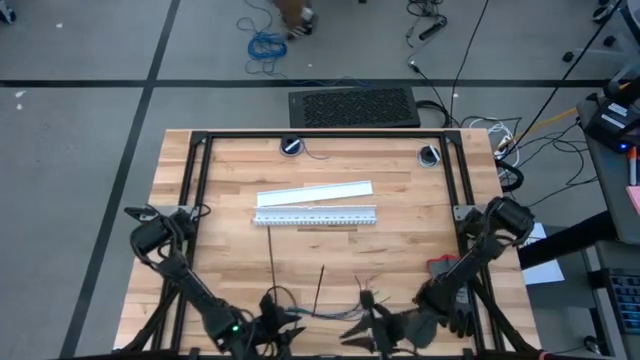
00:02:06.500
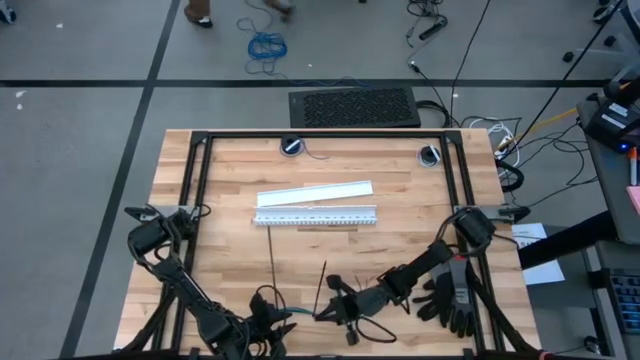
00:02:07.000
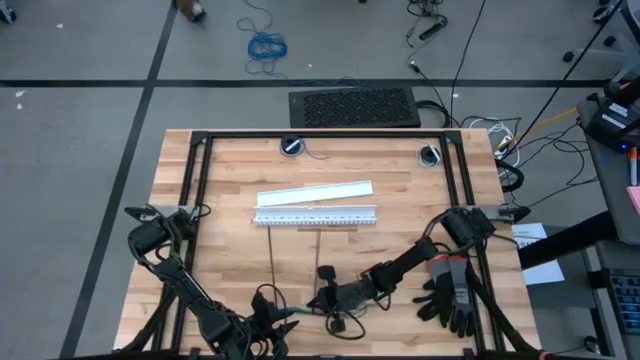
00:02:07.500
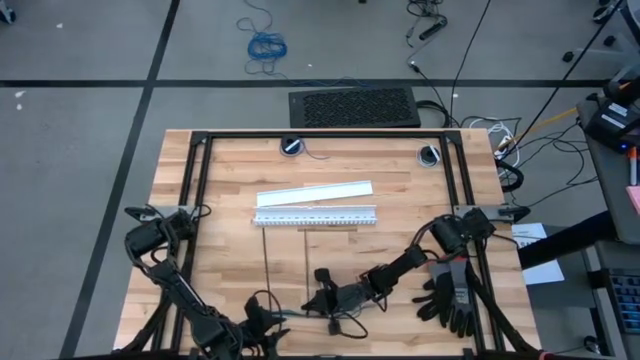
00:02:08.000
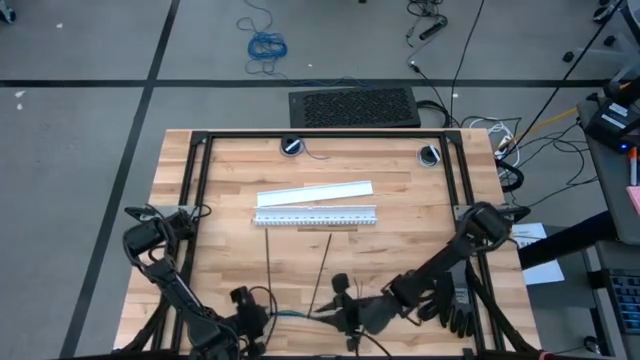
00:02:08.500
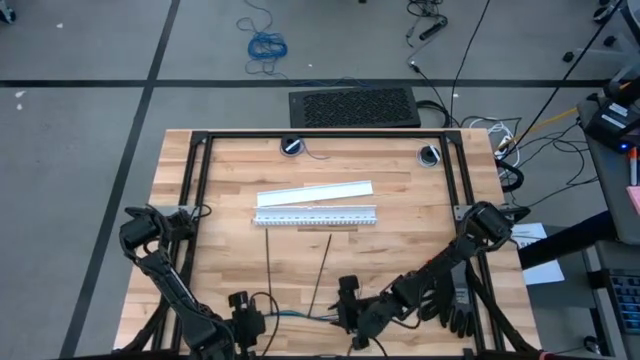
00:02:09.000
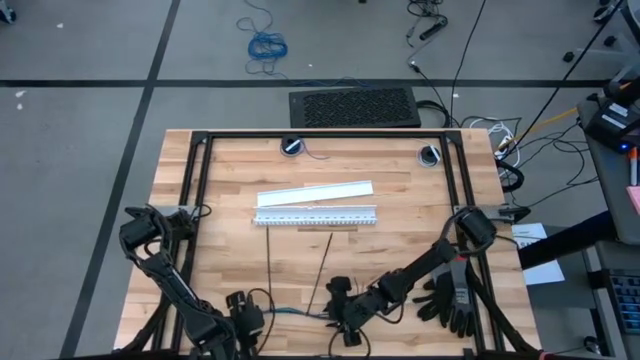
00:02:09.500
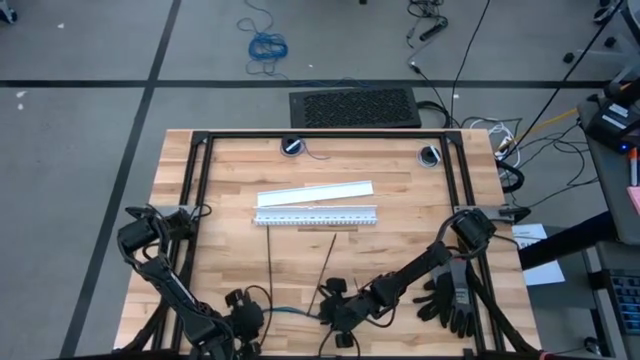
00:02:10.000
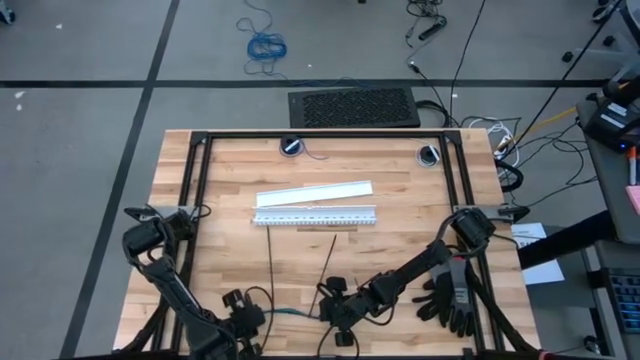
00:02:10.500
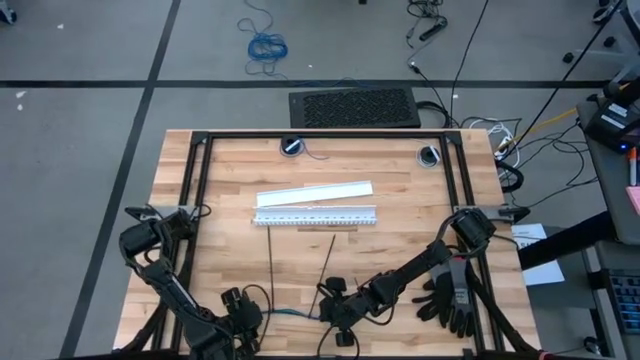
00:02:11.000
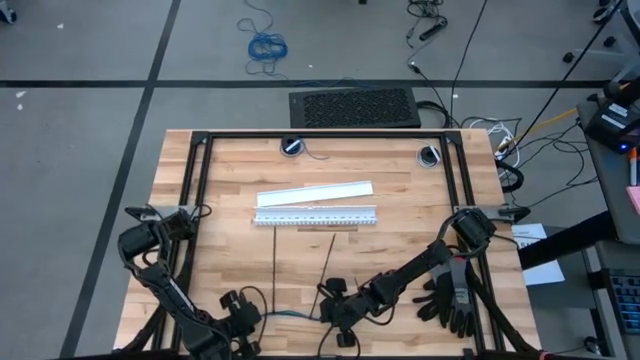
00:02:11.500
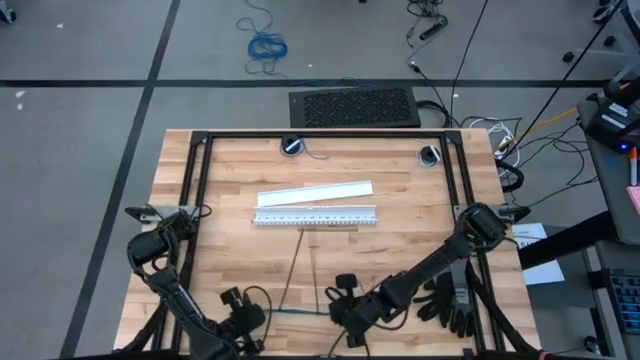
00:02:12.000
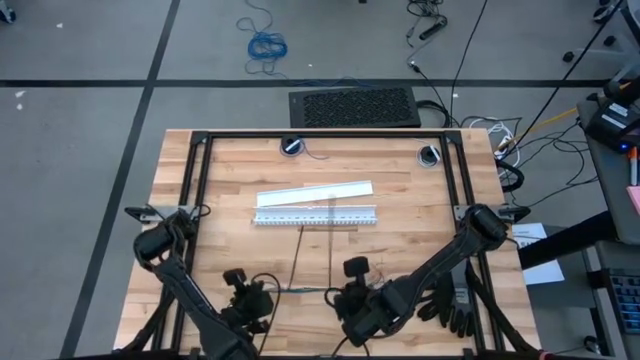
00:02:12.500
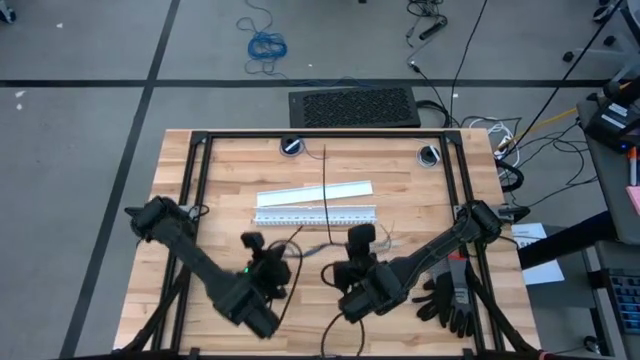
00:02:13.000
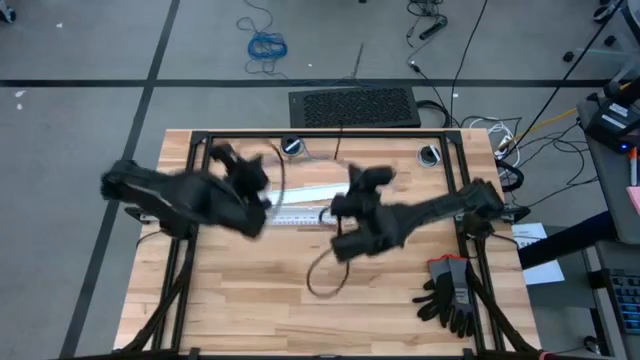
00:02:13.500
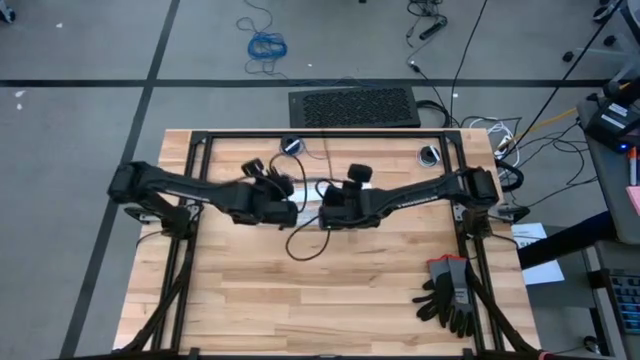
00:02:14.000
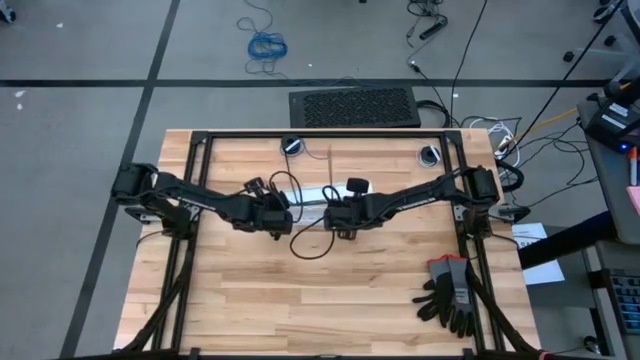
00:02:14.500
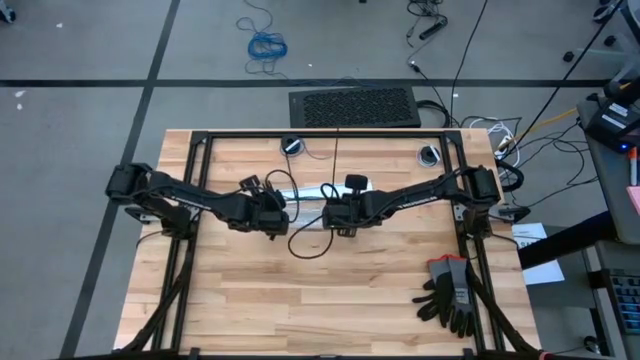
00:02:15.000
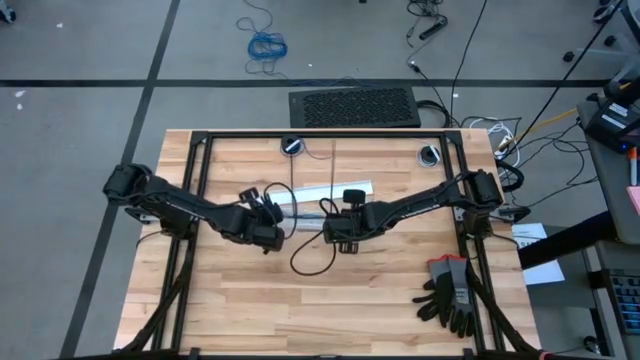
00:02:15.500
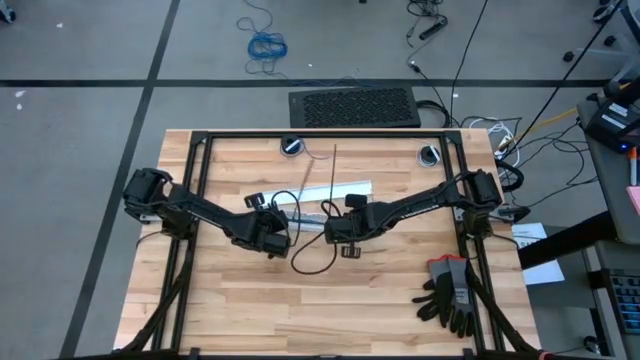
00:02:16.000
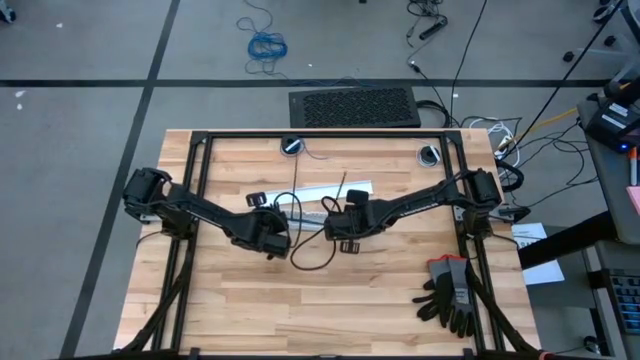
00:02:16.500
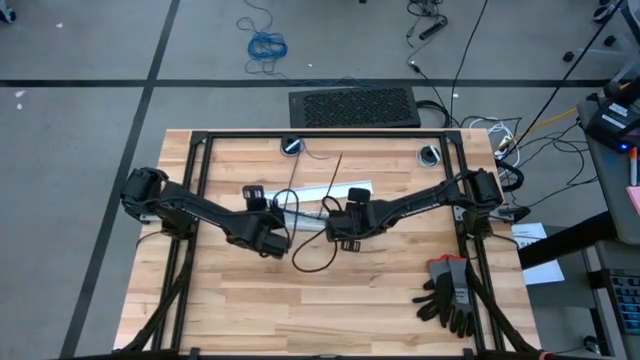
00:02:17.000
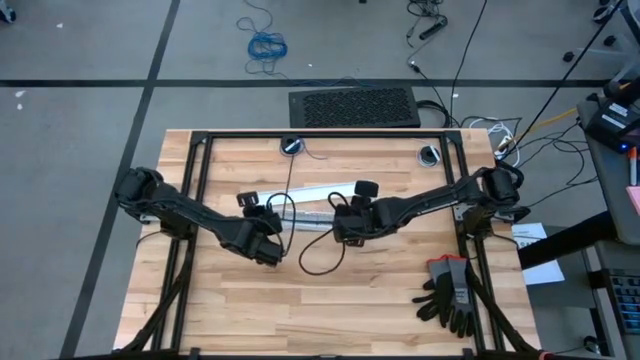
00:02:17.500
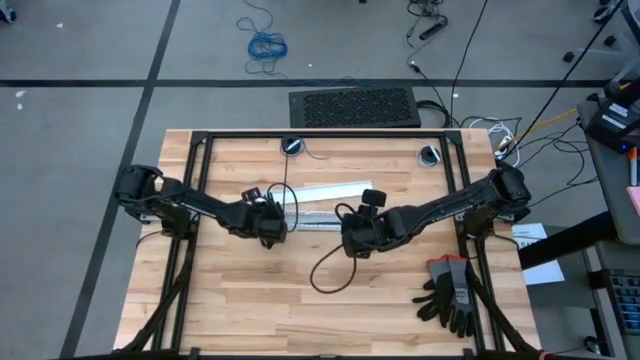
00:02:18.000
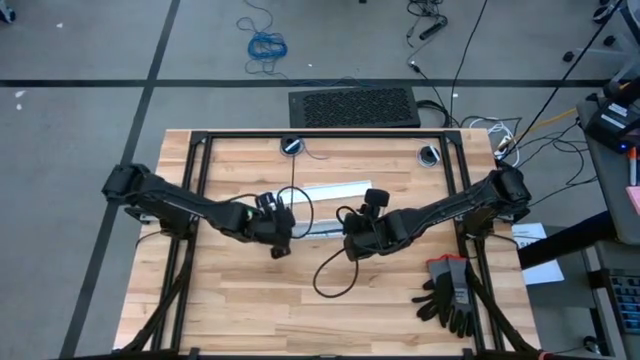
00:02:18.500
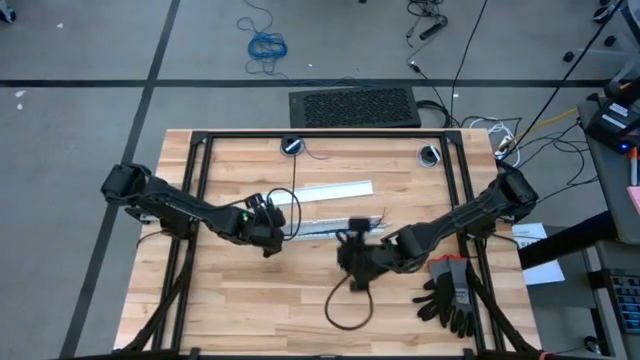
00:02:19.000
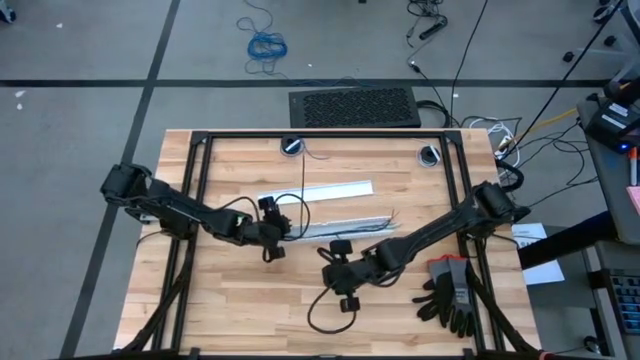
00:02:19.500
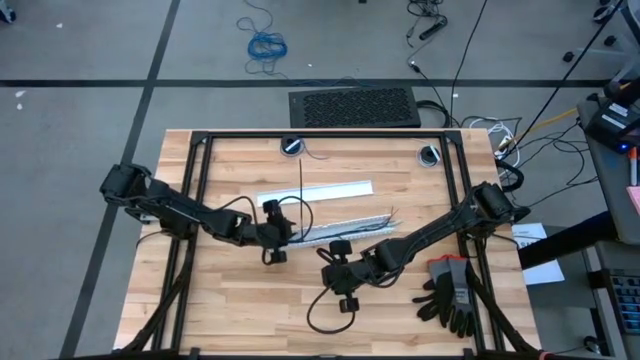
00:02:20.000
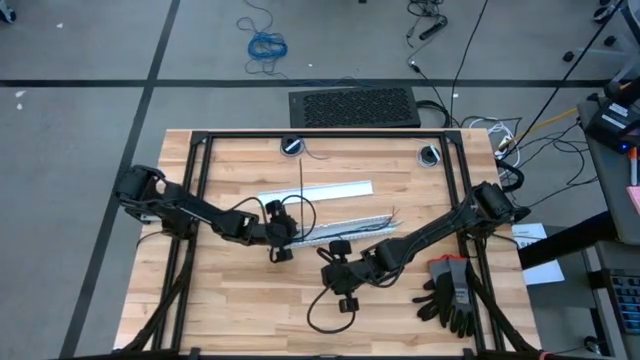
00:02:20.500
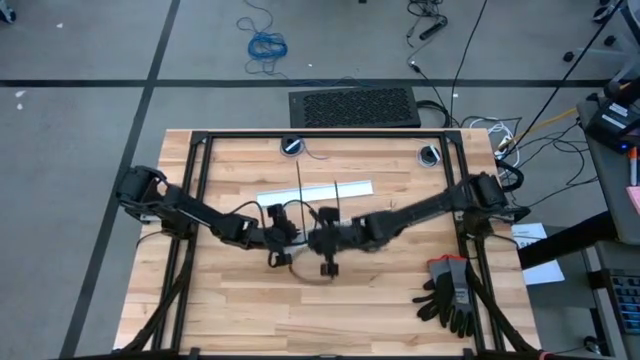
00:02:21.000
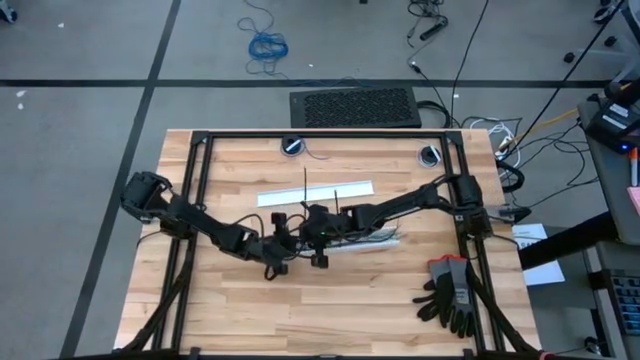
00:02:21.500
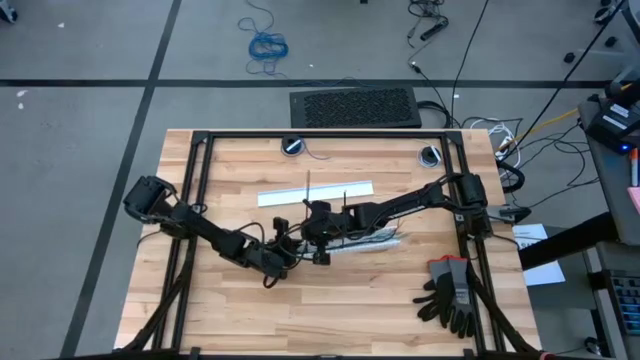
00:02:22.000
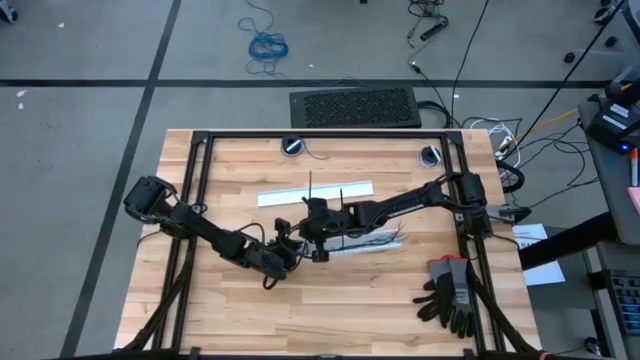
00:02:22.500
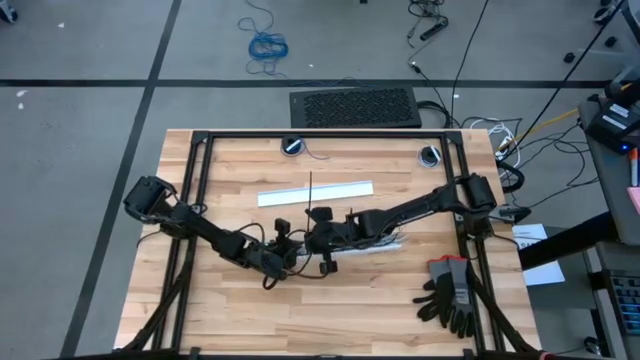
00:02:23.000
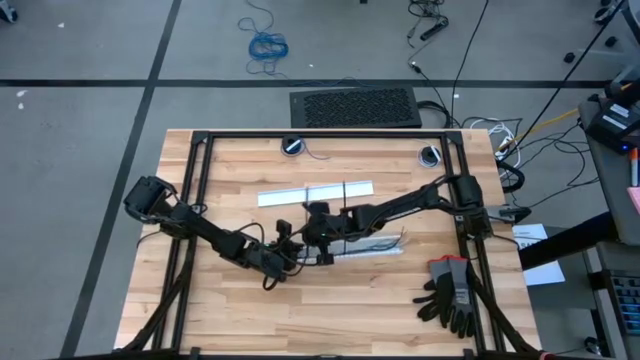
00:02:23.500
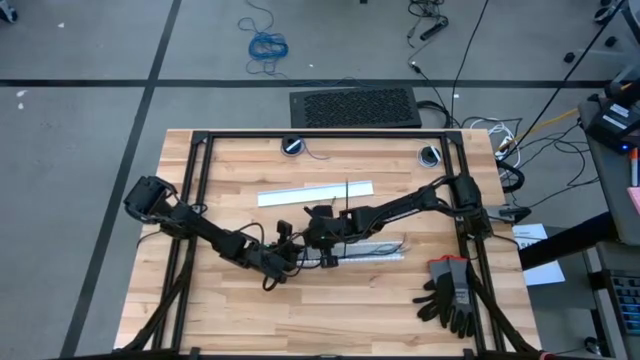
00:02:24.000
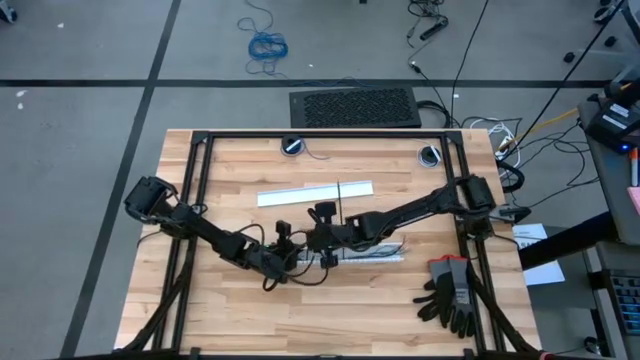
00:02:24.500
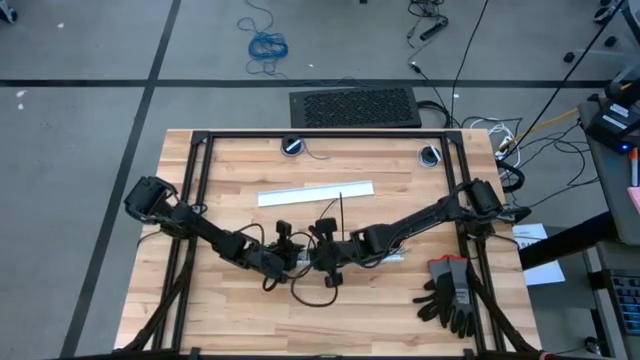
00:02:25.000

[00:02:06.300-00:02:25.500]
Task: Ziptie cables
Put the colored zip tied cable wires into the white cable duct

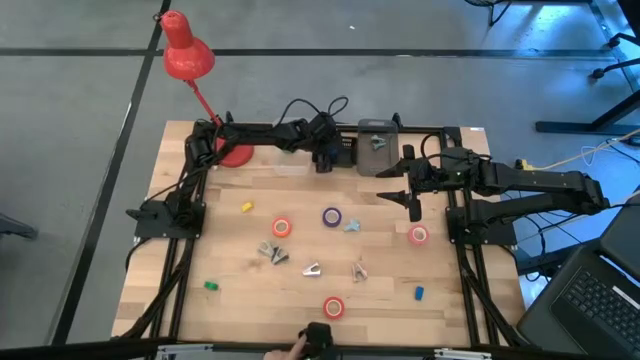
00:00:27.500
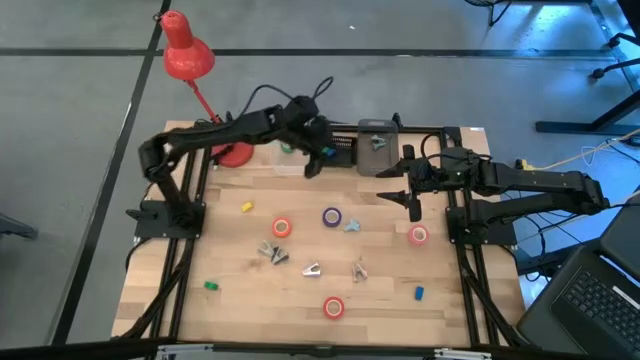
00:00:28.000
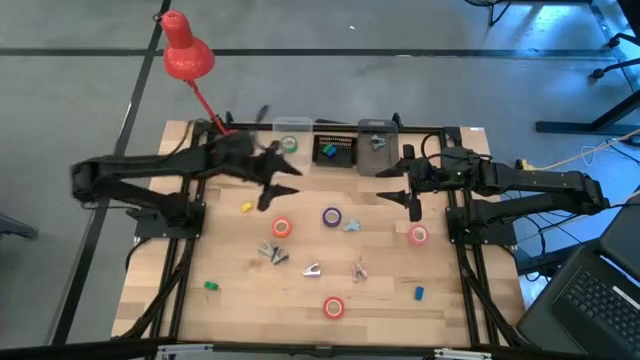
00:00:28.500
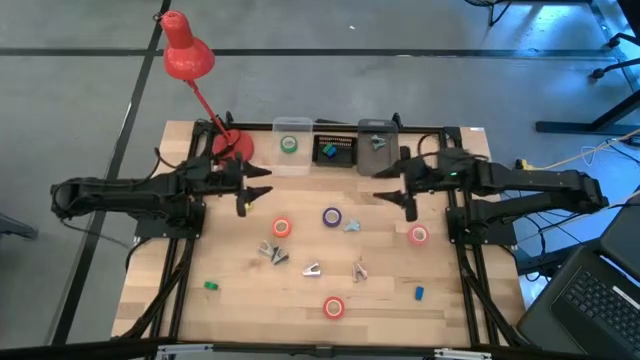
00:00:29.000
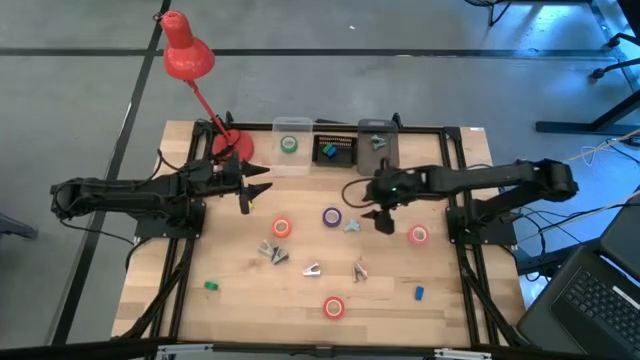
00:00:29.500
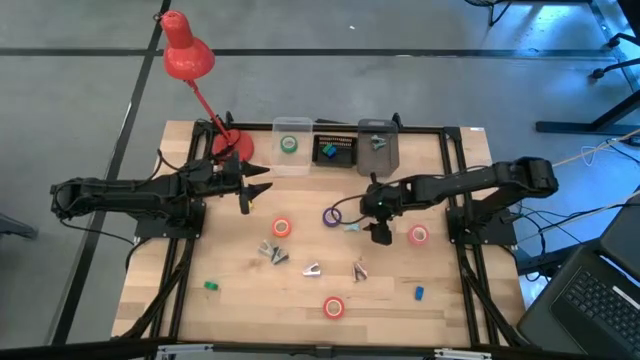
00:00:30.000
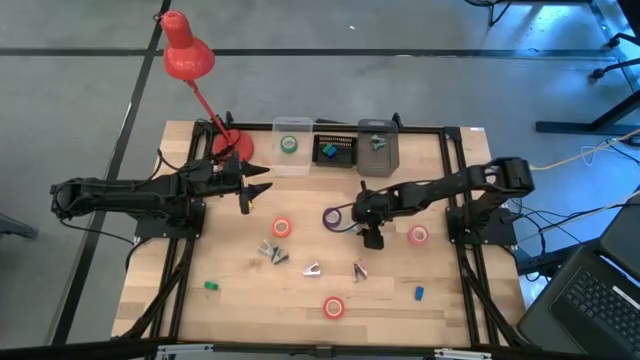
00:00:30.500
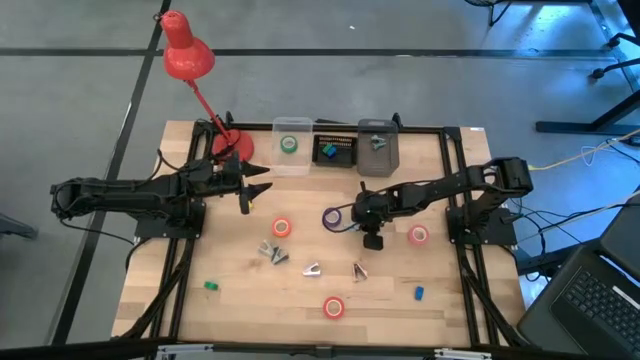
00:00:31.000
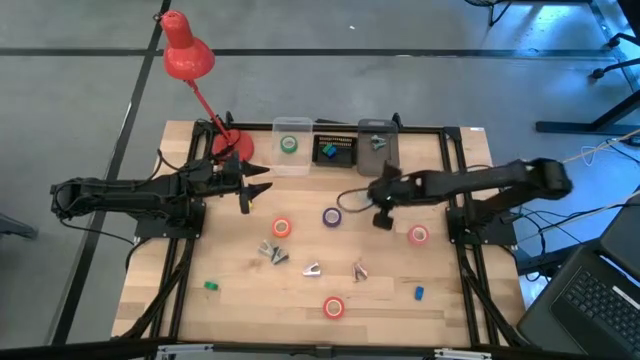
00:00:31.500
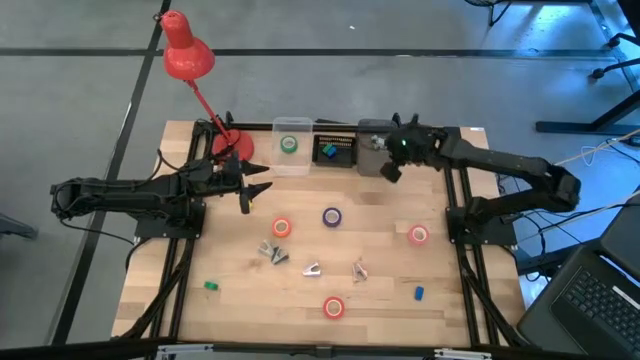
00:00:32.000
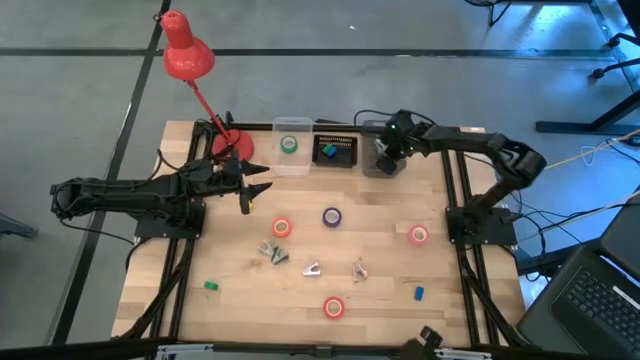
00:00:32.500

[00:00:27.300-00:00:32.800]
Task: Pick and place Stapler, Stapler remover, tape
Put the light blue staple remover into the right black bin
